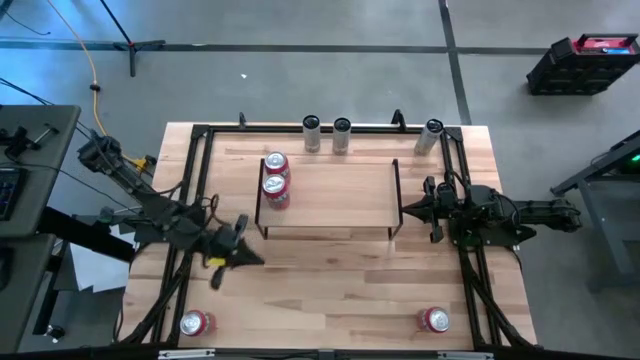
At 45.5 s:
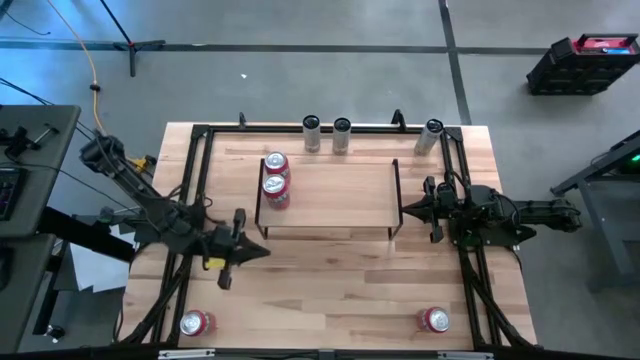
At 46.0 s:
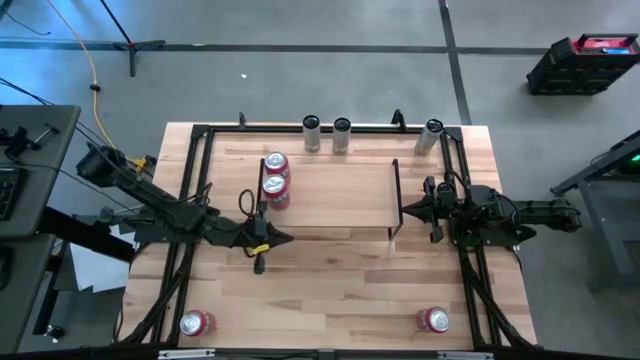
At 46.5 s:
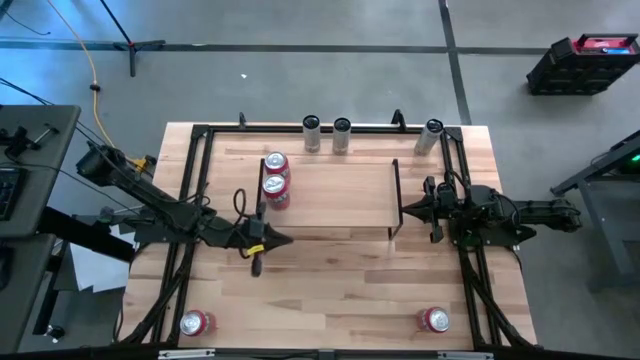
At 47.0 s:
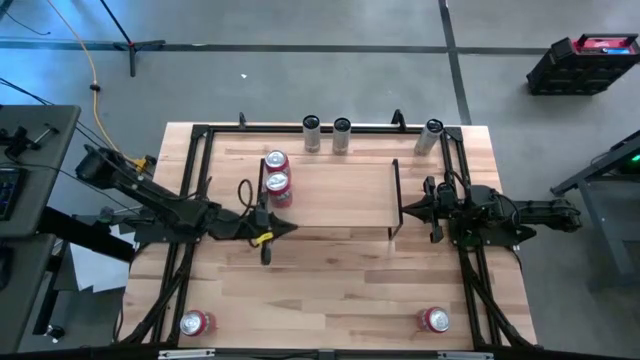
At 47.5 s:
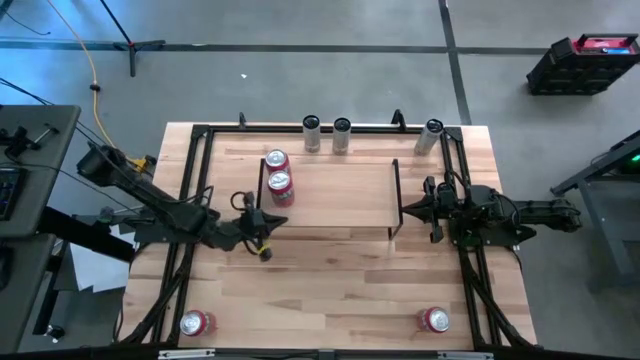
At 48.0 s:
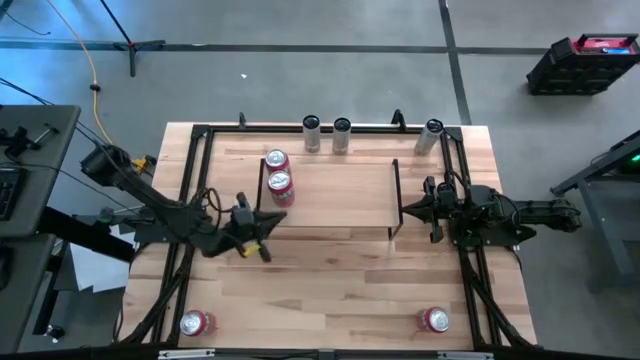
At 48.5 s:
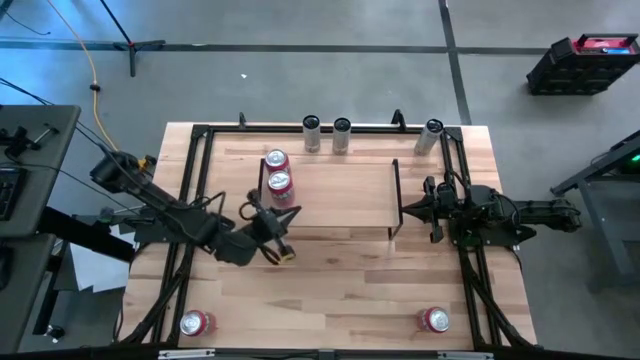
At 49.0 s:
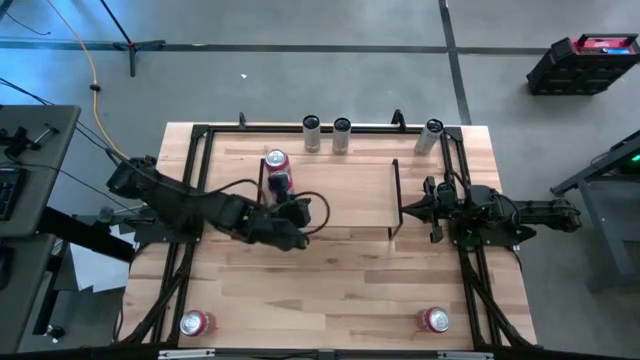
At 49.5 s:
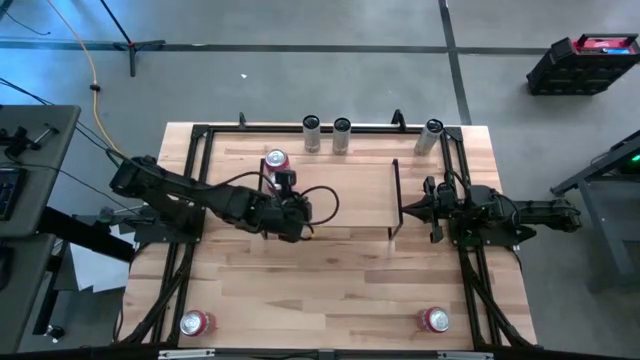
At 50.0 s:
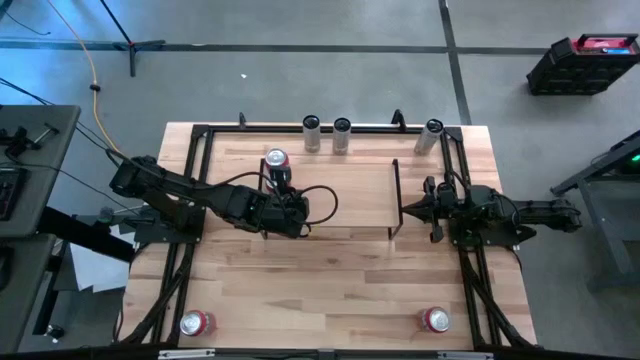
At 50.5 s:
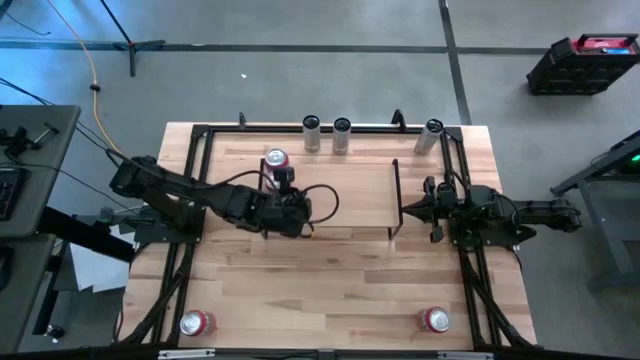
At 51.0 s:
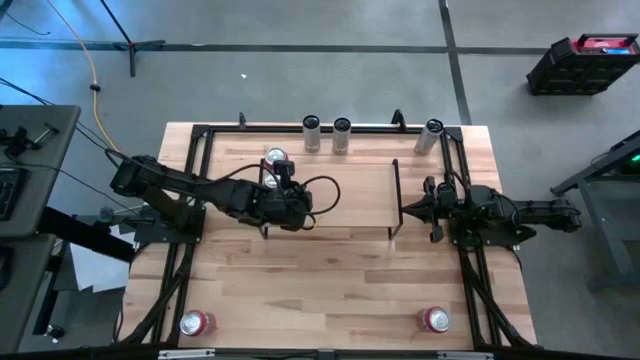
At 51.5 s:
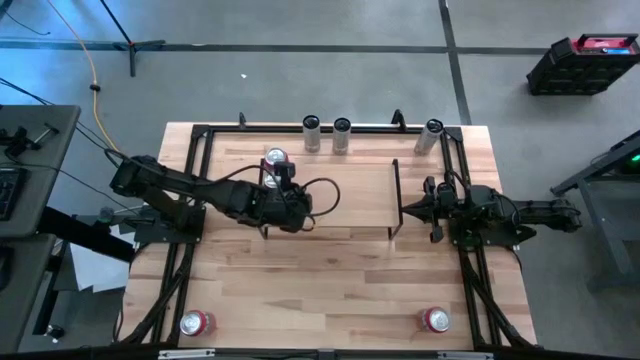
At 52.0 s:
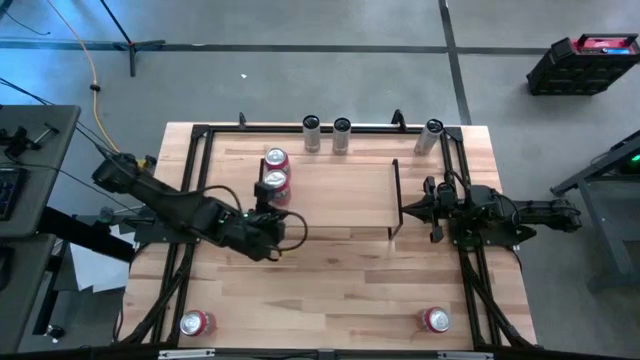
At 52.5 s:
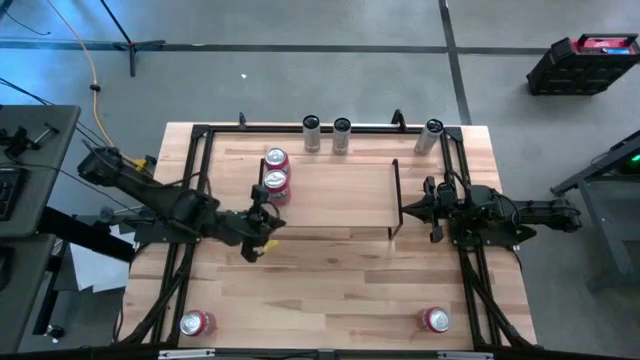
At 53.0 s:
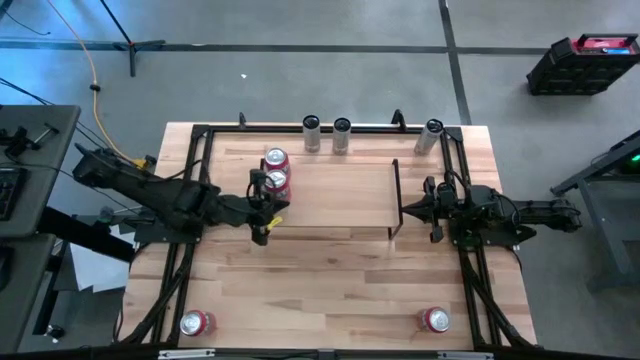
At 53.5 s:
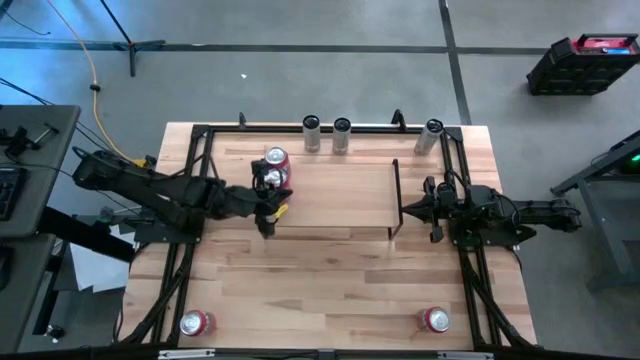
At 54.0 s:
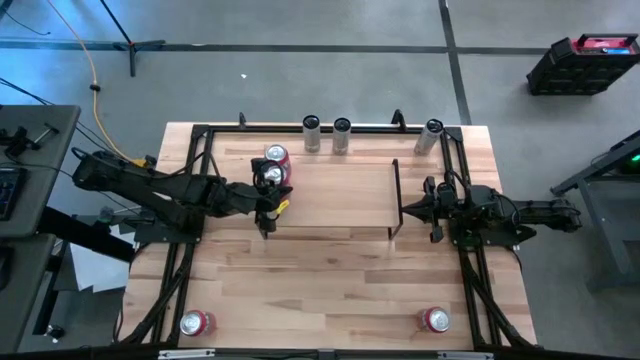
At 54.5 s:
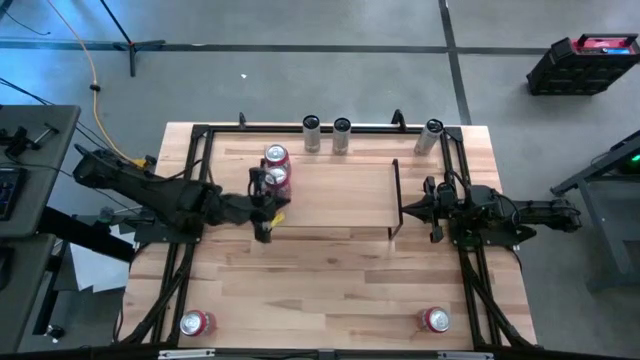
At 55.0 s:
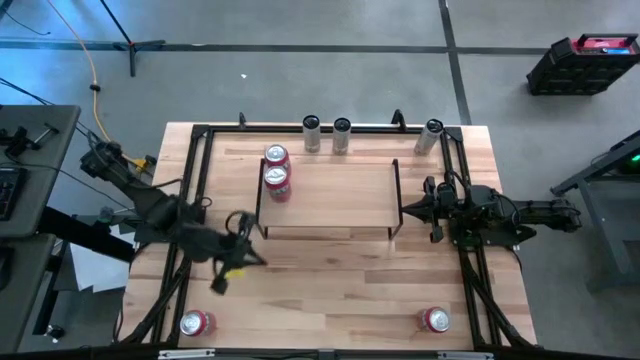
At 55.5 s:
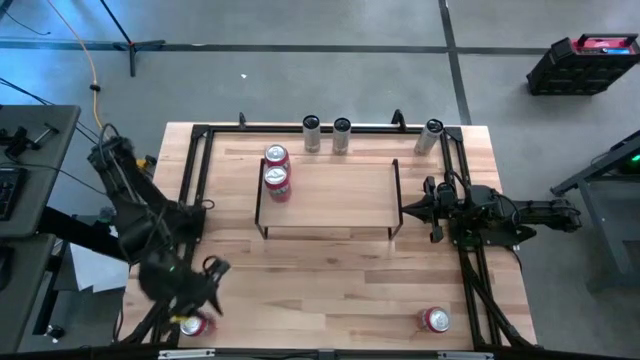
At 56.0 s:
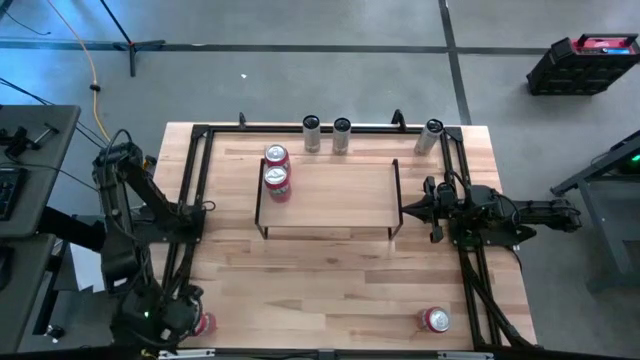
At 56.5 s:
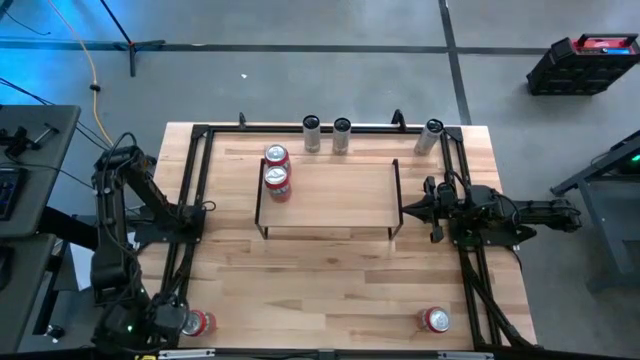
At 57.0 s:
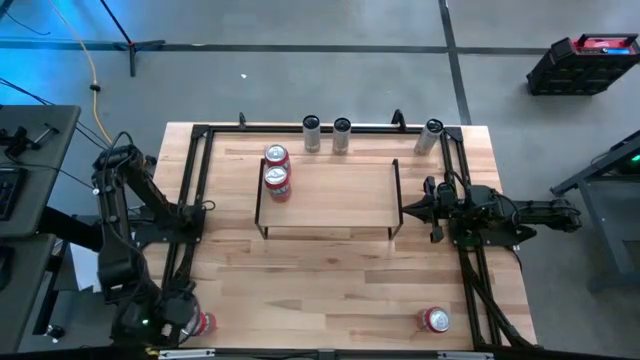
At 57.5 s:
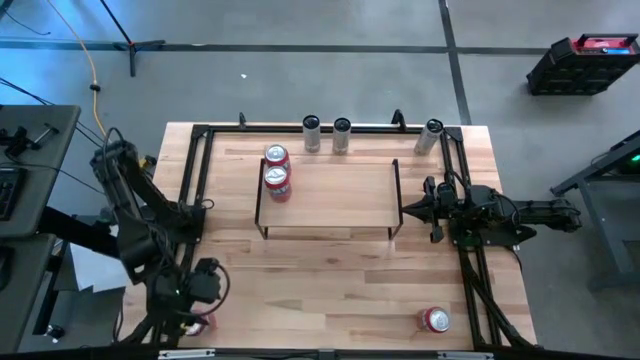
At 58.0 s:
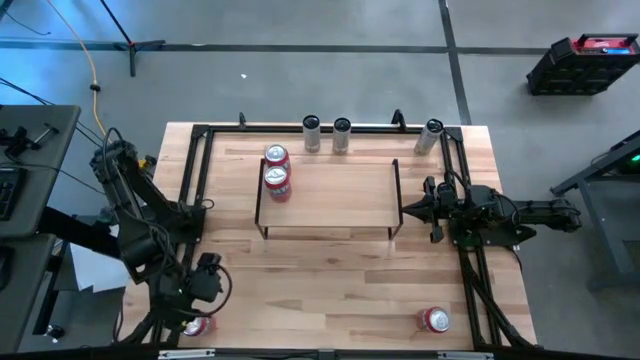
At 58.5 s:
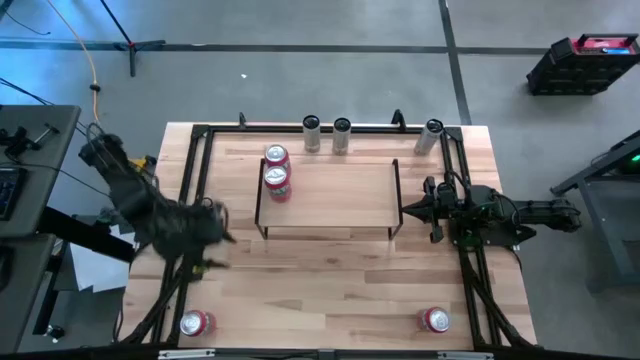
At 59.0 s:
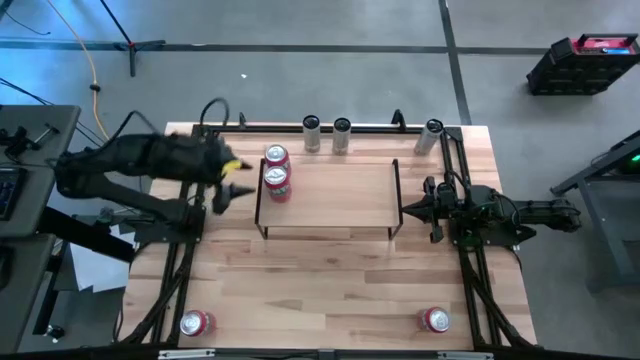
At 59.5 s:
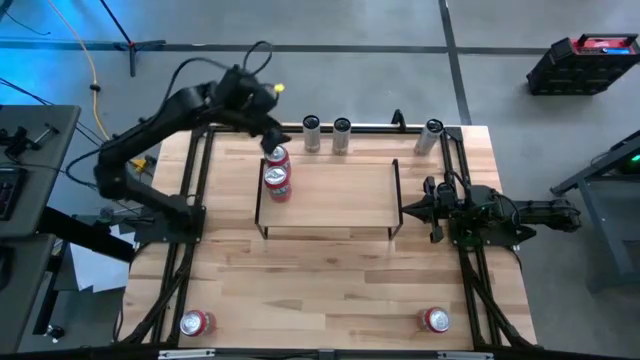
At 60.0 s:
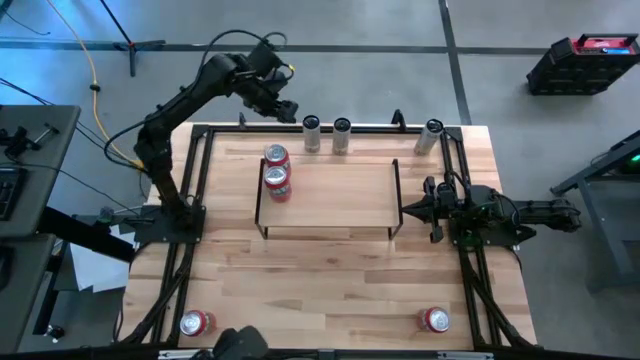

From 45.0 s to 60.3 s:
Task: Place canned beverage on shelf
Adjust the red soda cans on the shelf

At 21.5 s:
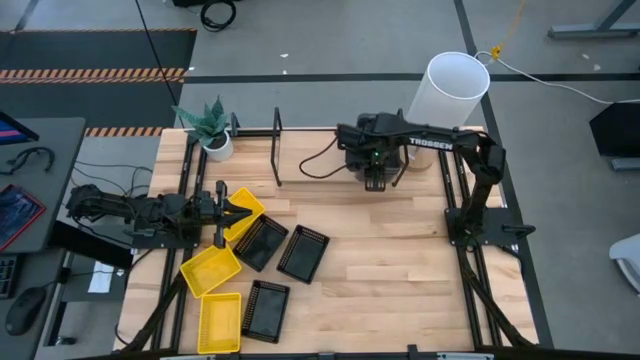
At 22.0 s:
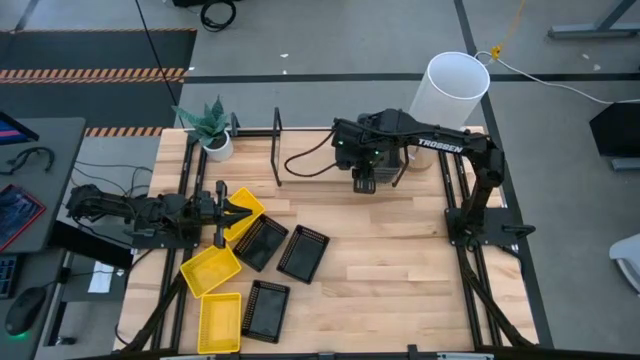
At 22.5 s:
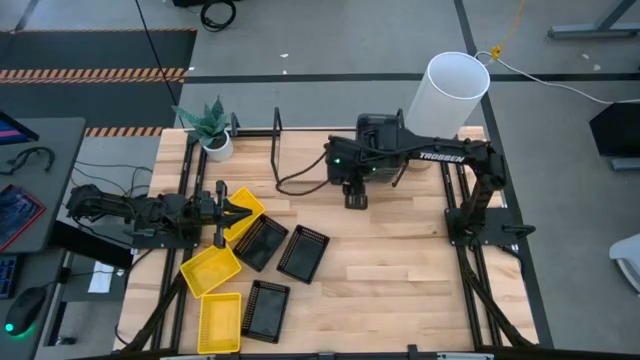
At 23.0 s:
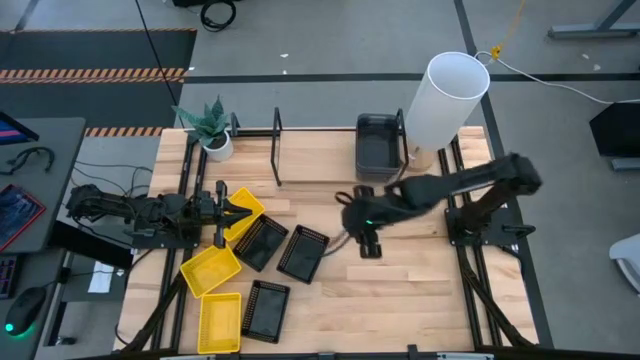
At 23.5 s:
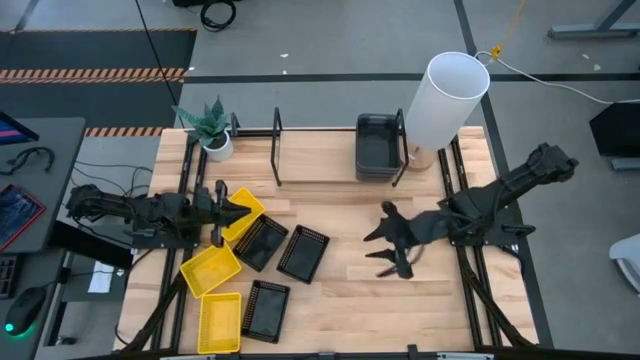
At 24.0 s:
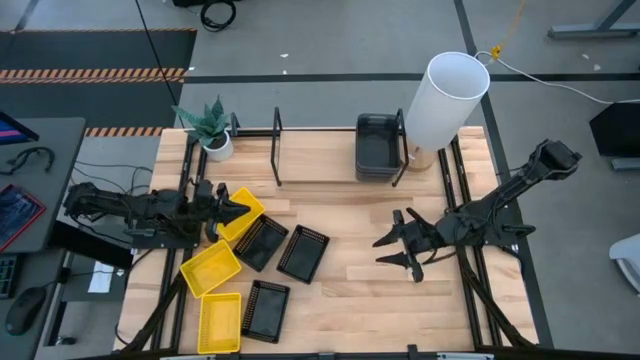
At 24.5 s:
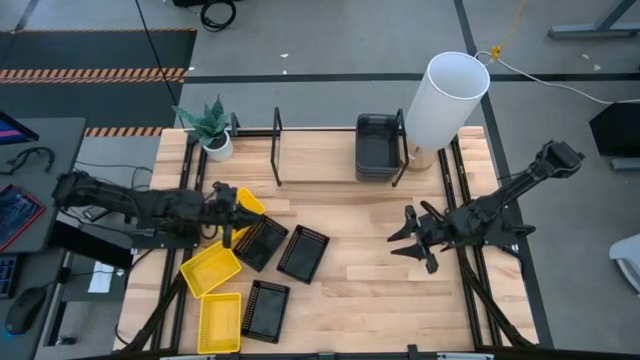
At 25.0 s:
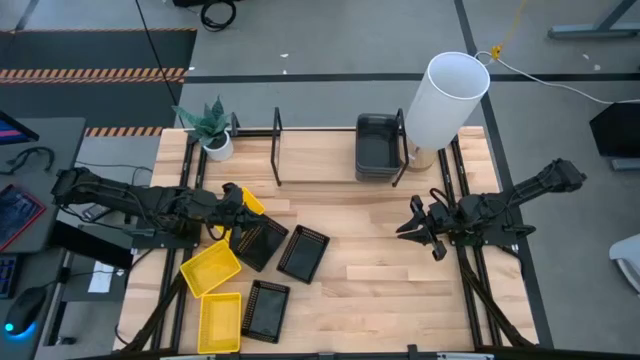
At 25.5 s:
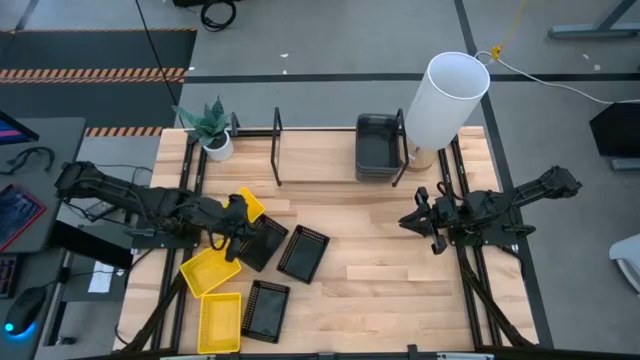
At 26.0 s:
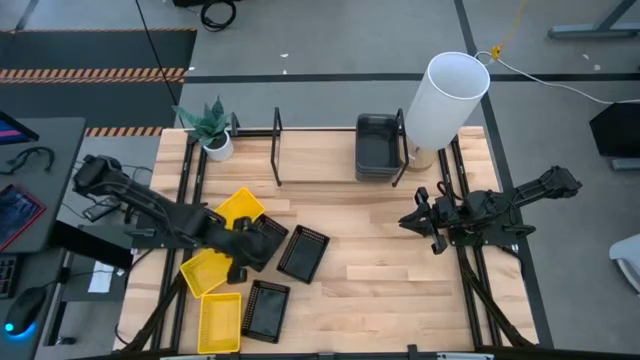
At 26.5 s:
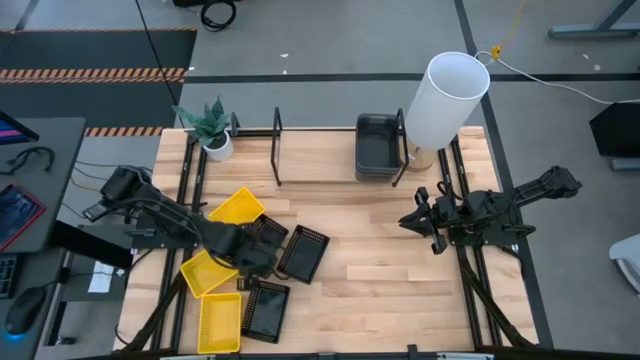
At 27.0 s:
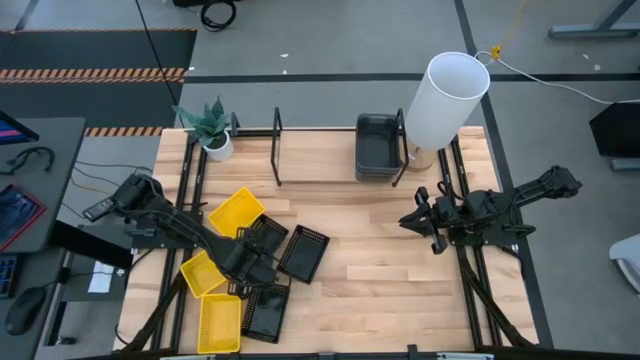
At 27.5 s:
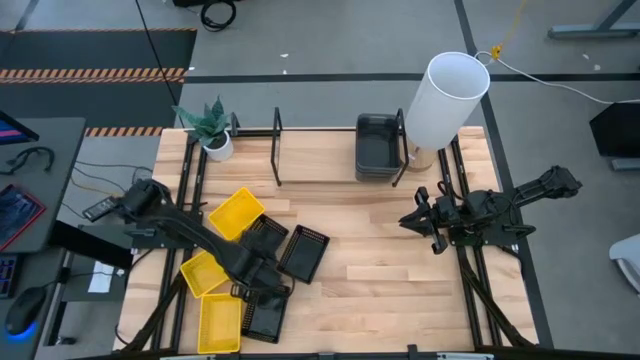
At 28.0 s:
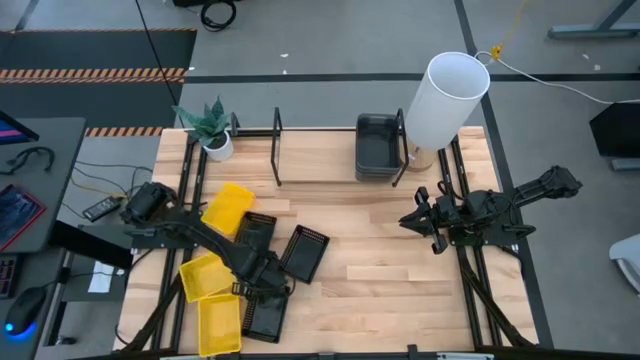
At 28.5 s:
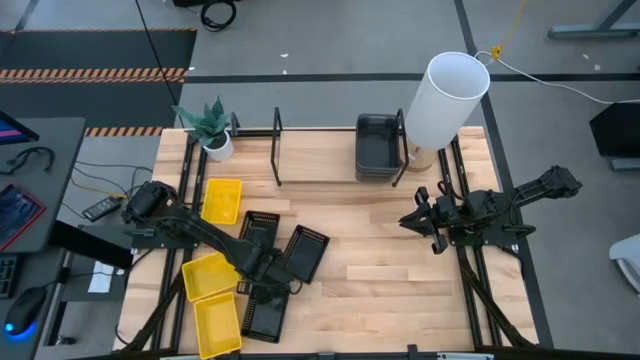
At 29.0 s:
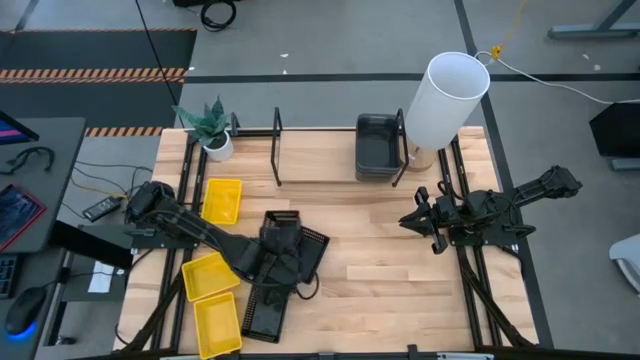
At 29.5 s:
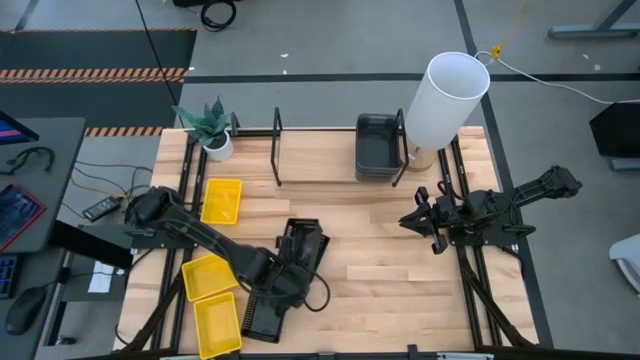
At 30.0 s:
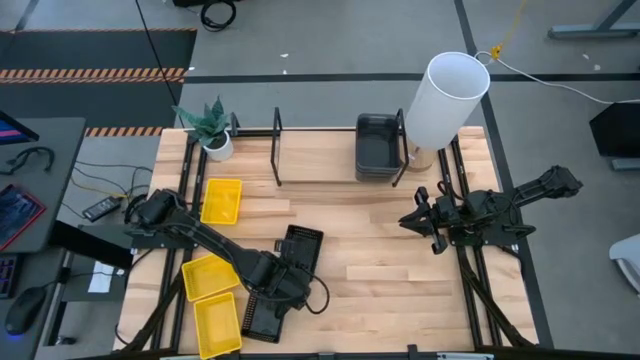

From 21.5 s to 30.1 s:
Task: Stack baskets on shelf by color
Stack the top left black bin on top of the top right black bin
